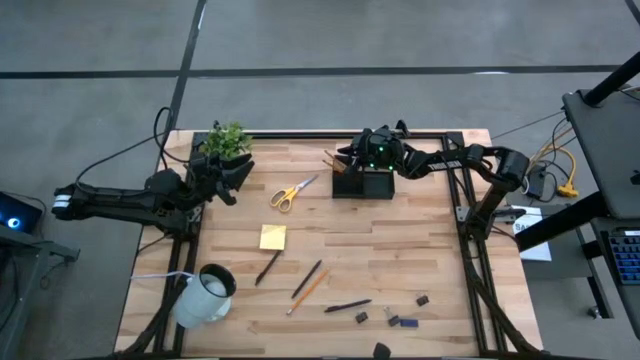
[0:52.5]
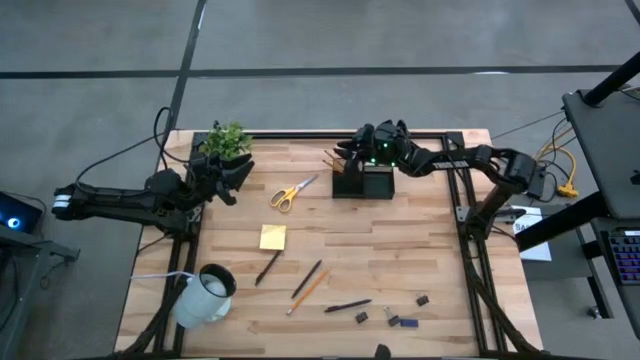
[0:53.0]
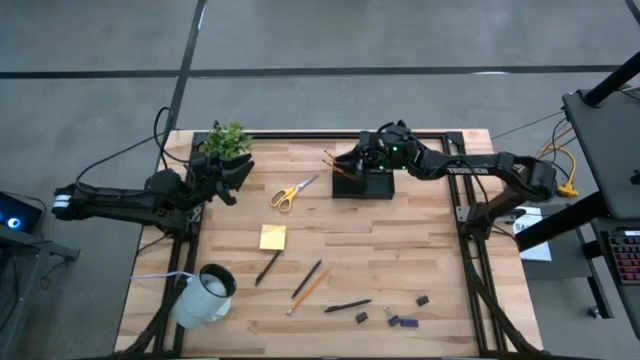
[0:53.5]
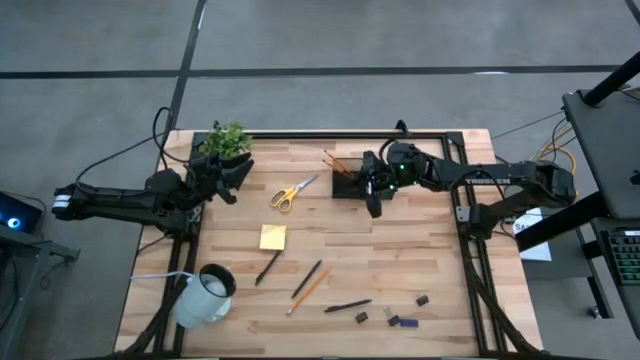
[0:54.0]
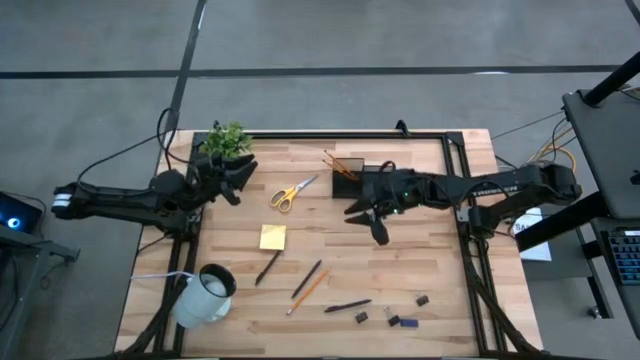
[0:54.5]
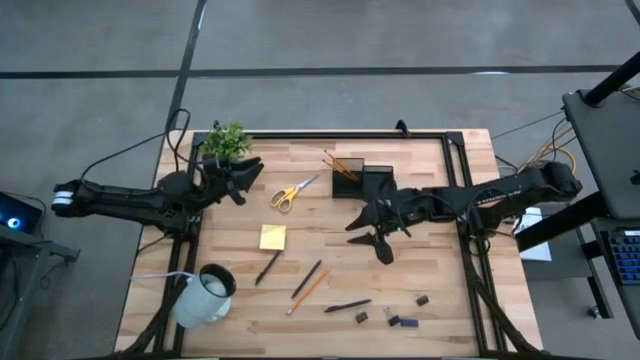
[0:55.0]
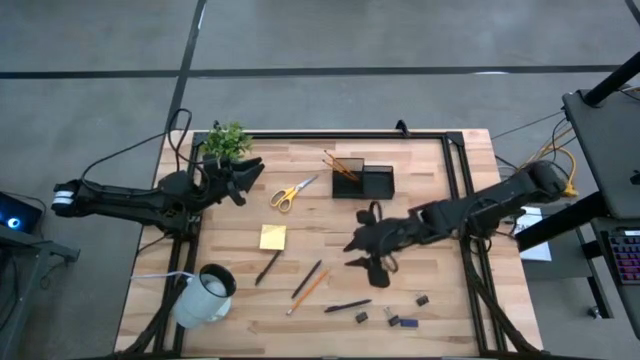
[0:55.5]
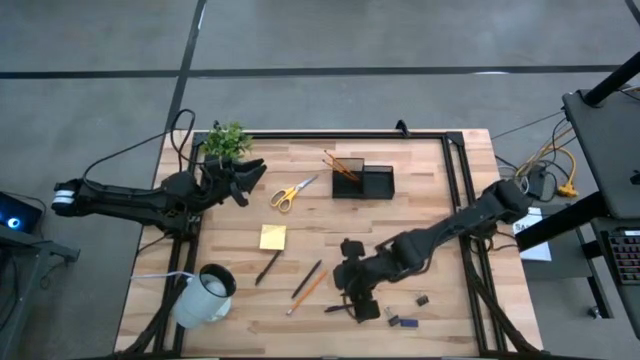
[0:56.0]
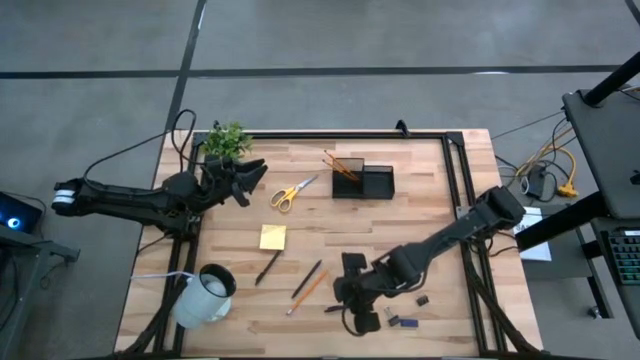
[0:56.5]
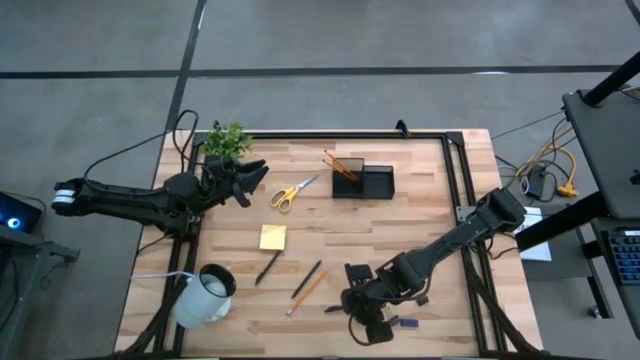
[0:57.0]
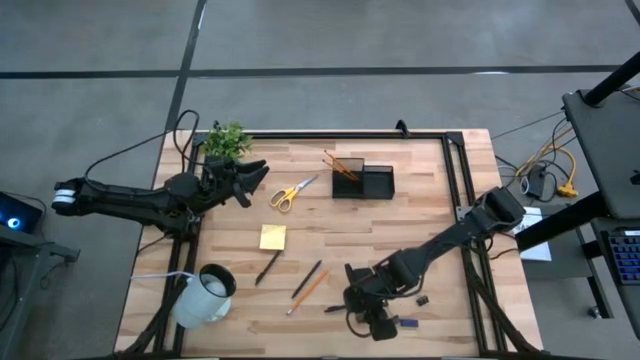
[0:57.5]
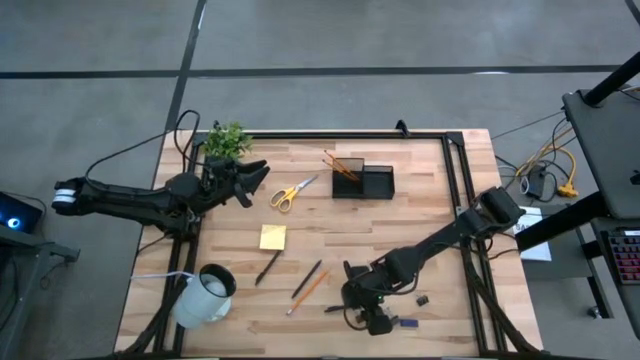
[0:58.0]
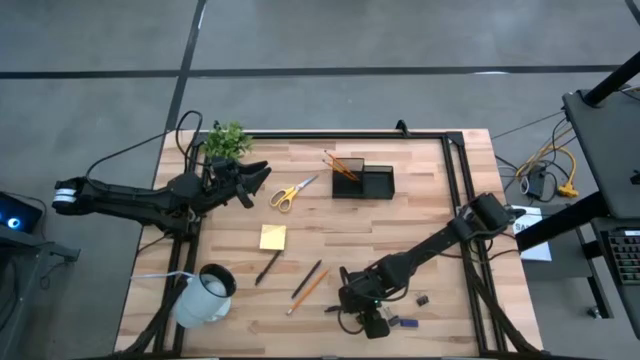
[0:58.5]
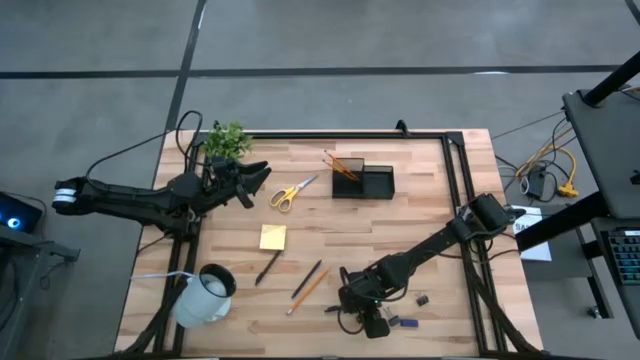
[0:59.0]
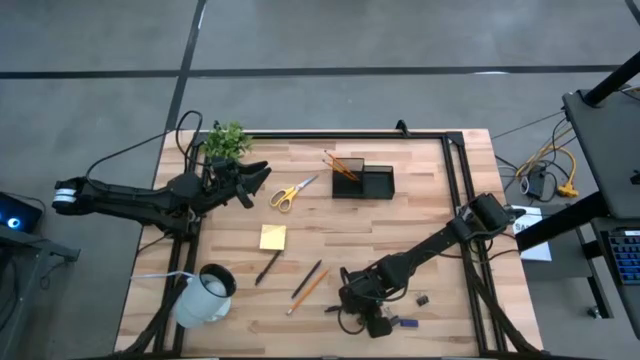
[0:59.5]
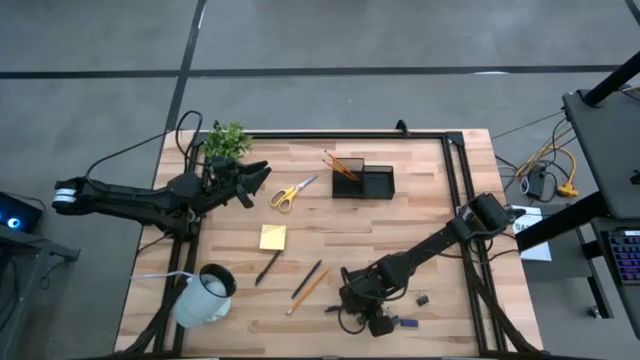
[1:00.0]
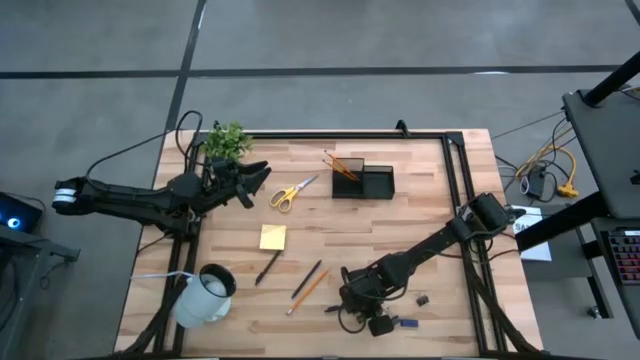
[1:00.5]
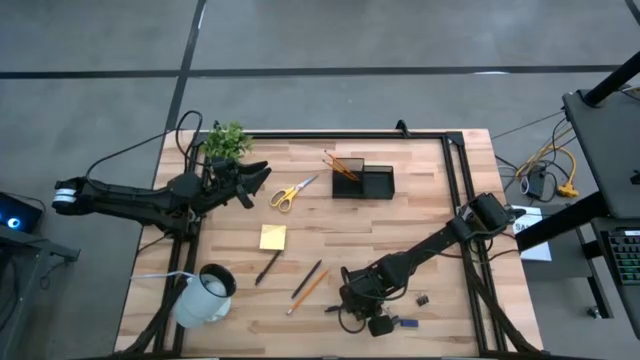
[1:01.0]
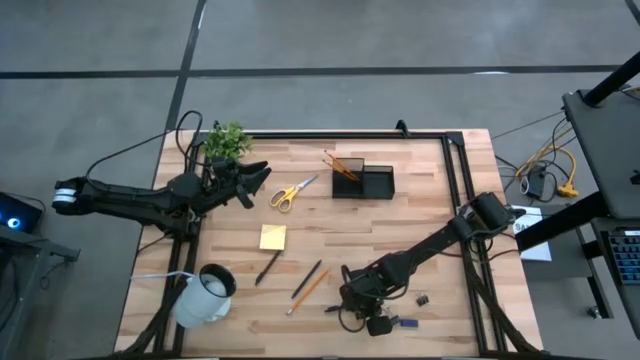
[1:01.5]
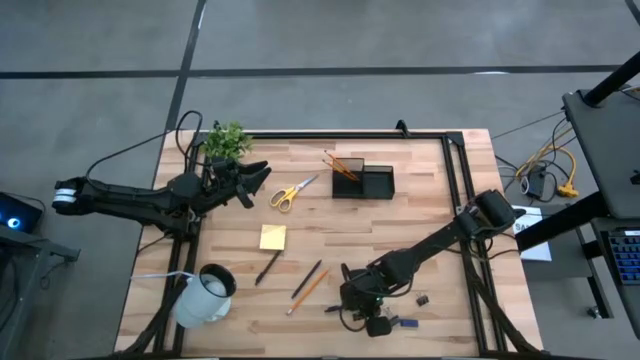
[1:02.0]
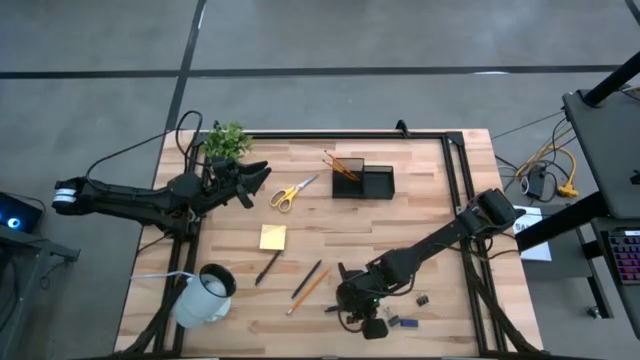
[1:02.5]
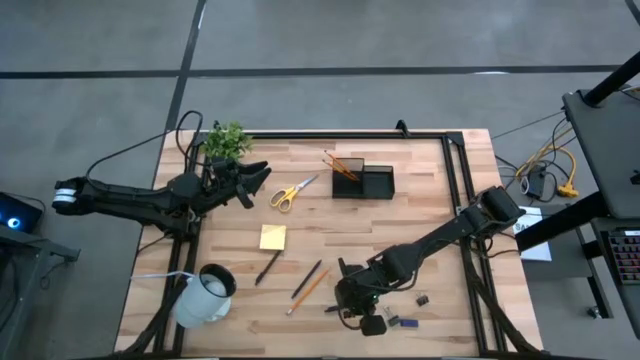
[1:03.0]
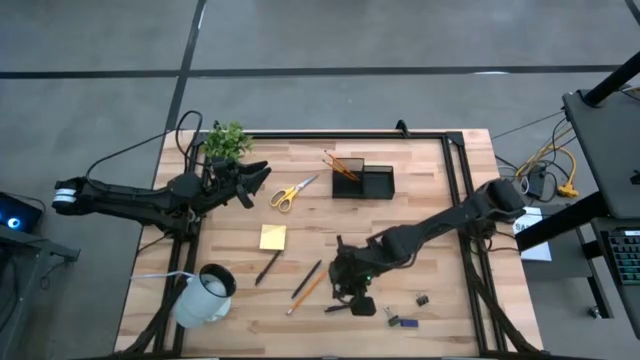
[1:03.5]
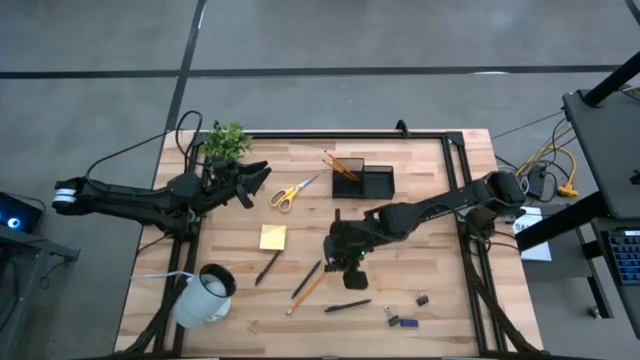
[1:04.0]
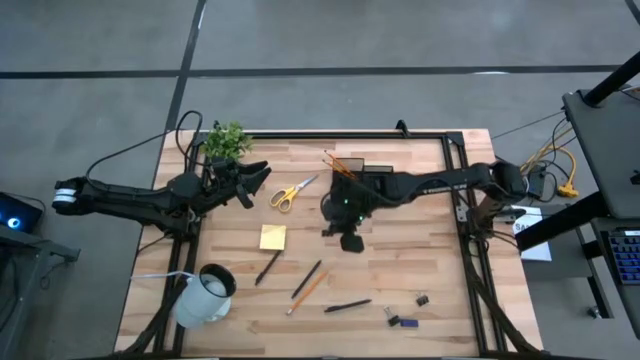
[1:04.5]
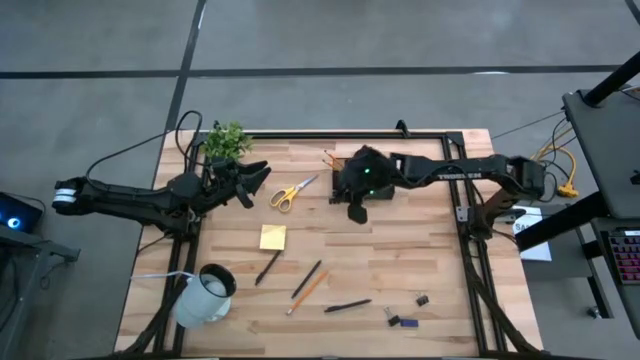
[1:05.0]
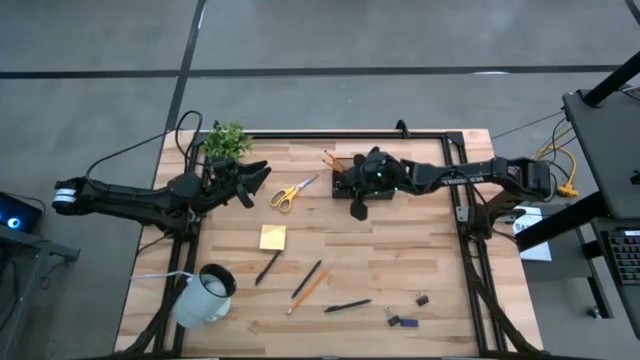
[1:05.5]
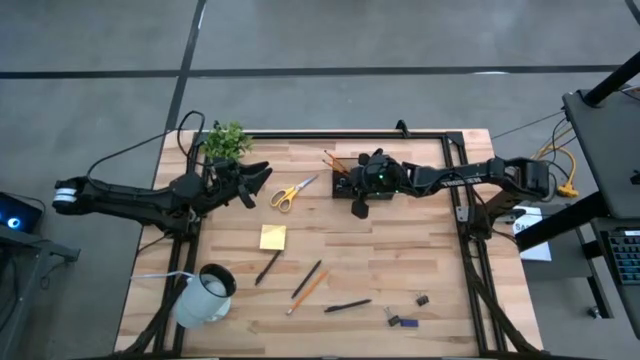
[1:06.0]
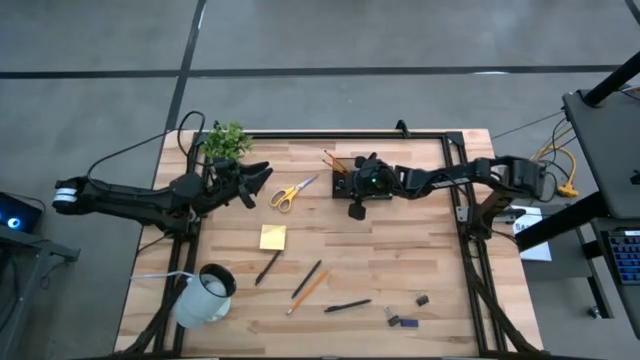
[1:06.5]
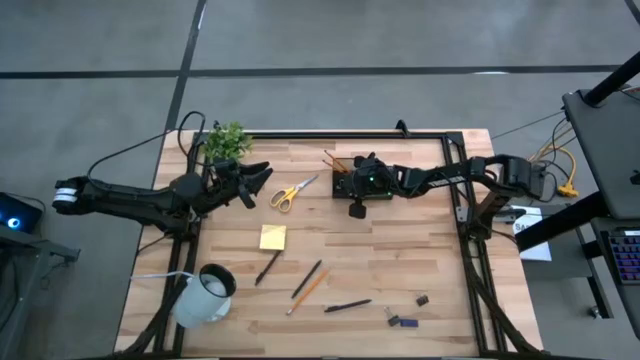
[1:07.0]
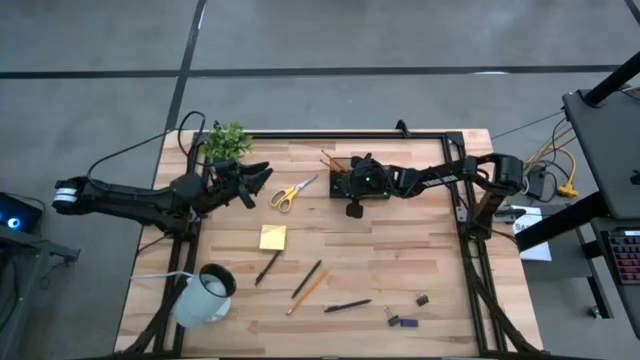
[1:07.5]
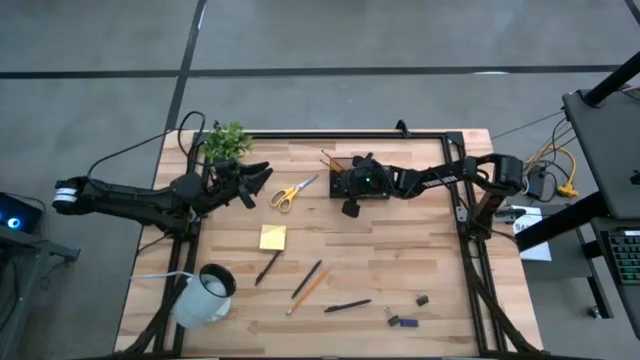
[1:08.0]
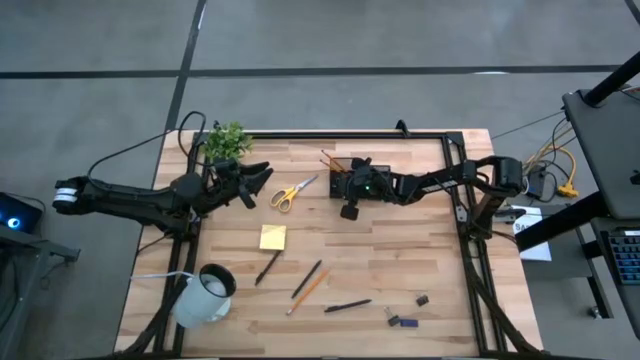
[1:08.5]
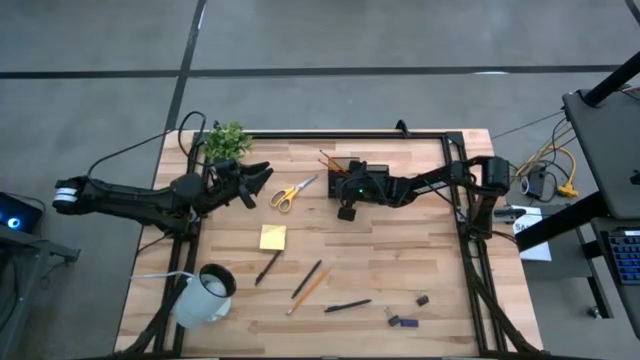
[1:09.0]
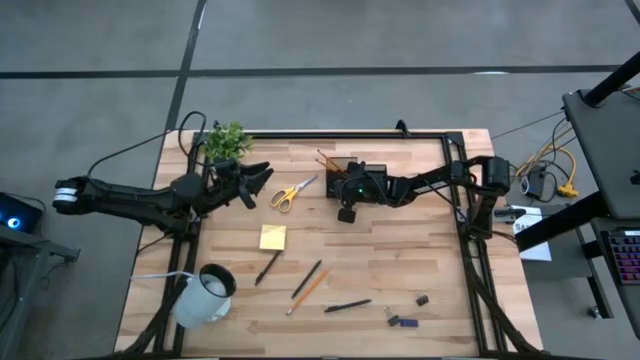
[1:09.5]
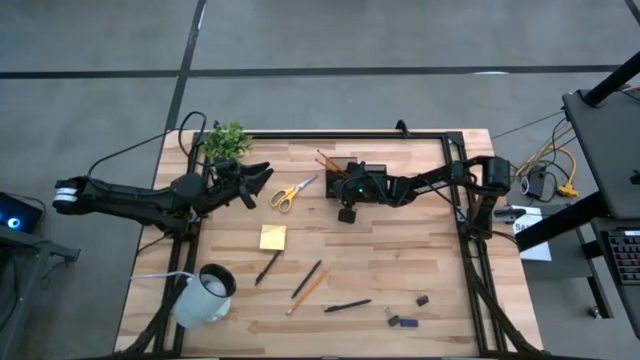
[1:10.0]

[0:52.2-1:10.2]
Task: Pick and place office supplies into organizer
Put the left binder clip into the desk organizer

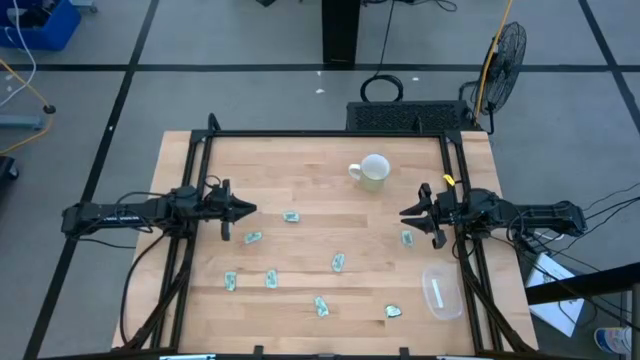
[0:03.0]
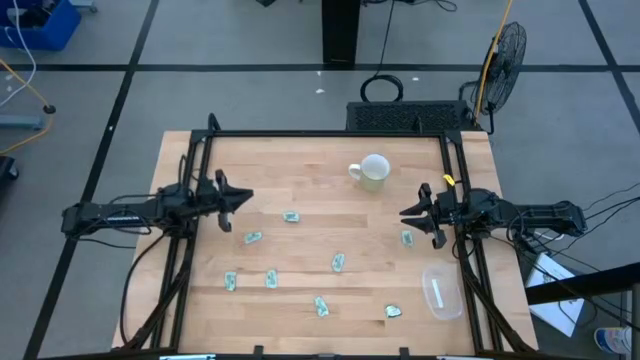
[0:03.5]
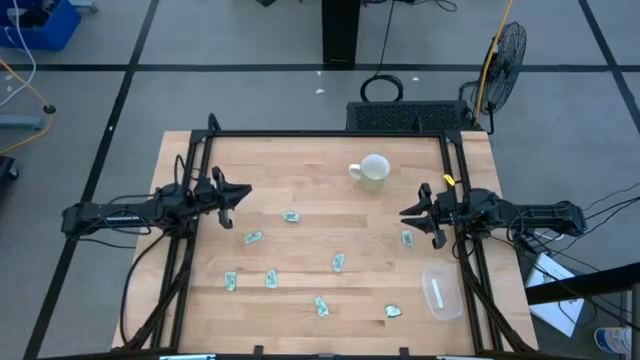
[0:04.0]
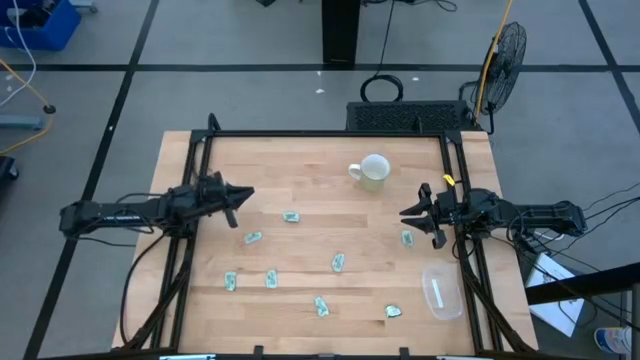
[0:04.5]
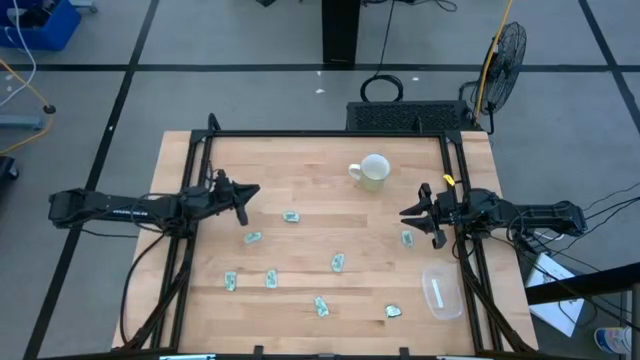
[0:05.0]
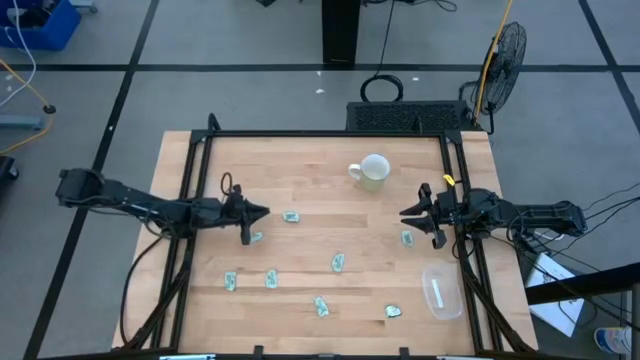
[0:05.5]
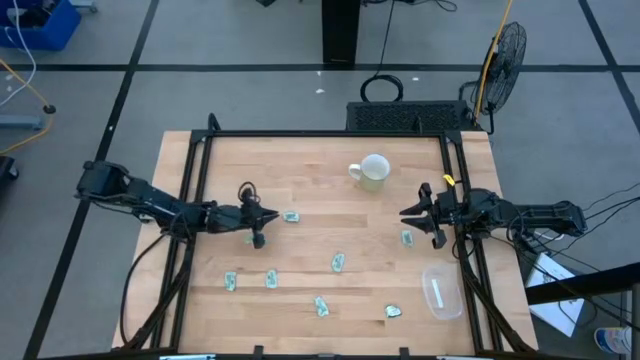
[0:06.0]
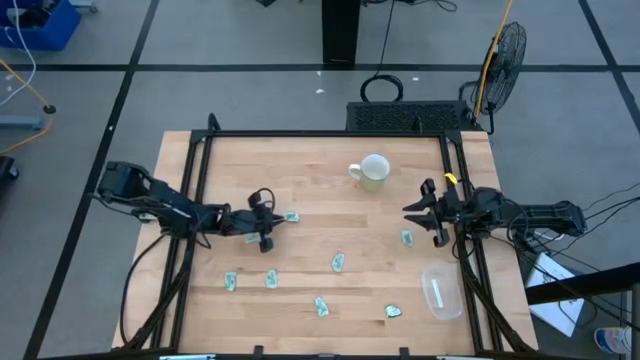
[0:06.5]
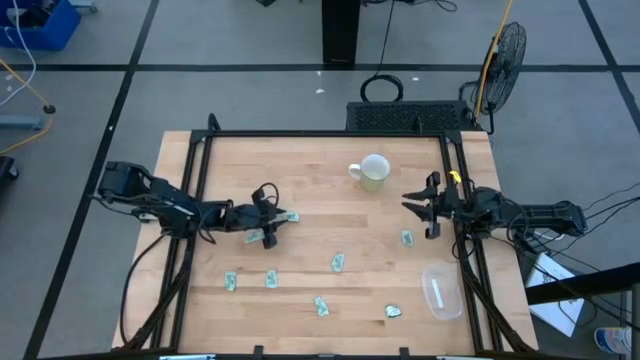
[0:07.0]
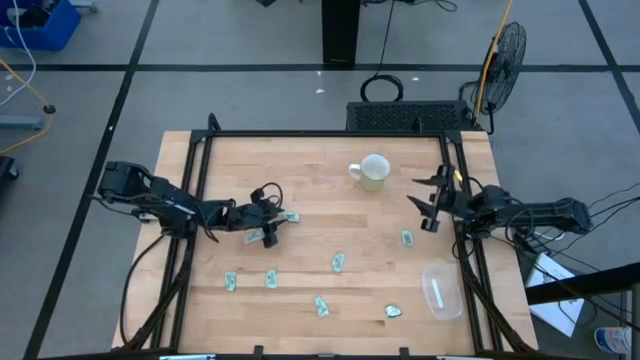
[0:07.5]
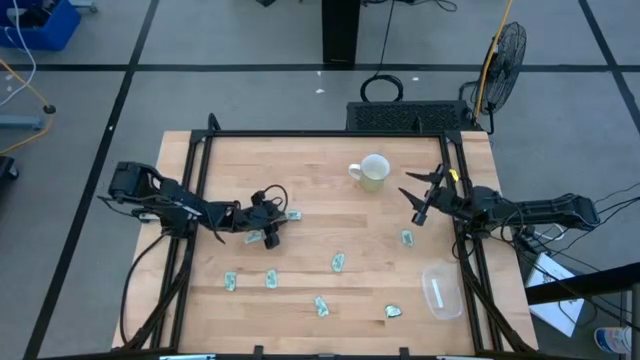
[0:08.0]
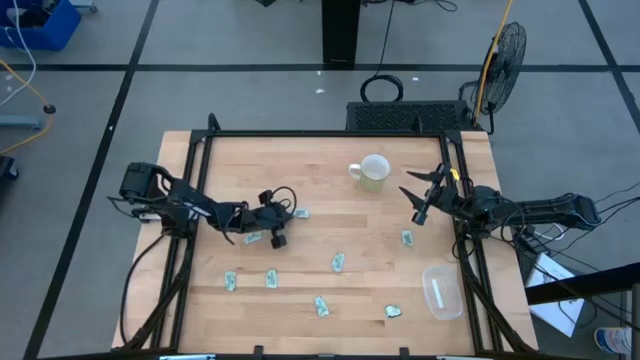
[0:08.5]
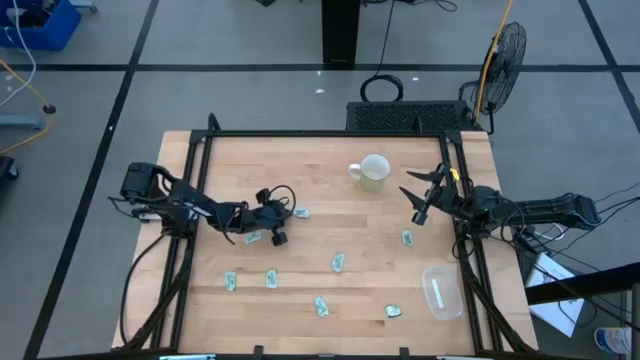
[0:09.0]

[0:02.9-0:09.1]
Task: Pick and place Stevia / Truvia into bins
Put the stevia packet into the transparent bin
